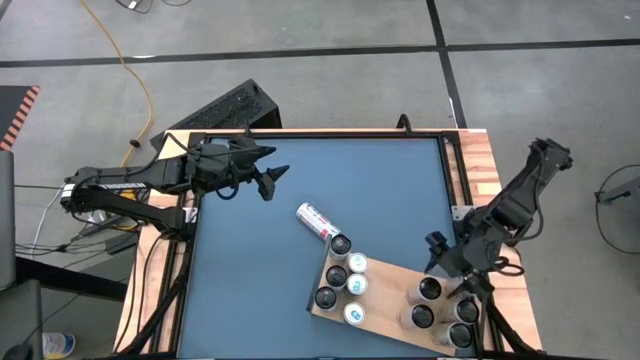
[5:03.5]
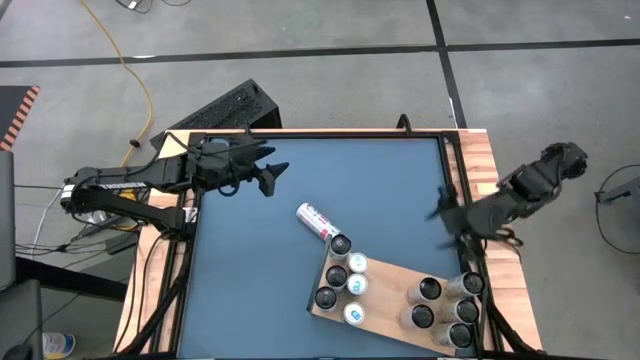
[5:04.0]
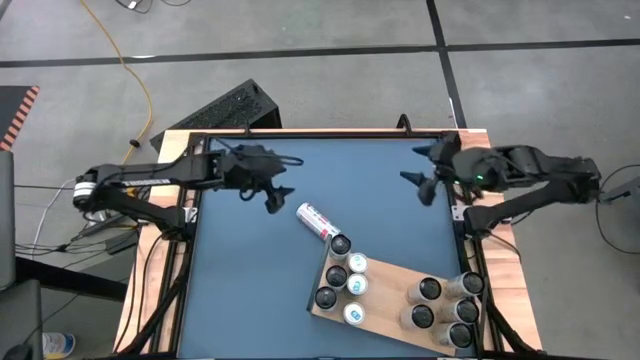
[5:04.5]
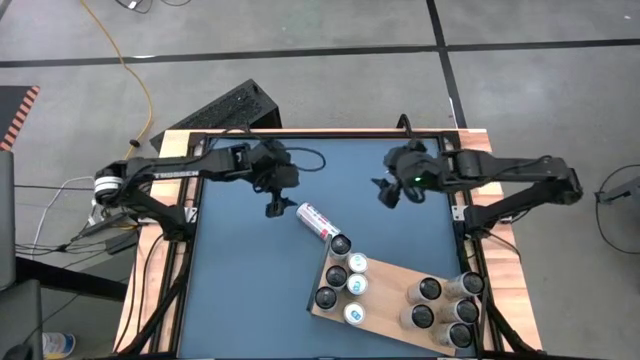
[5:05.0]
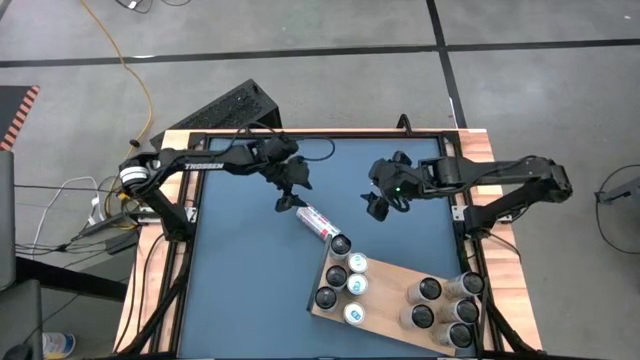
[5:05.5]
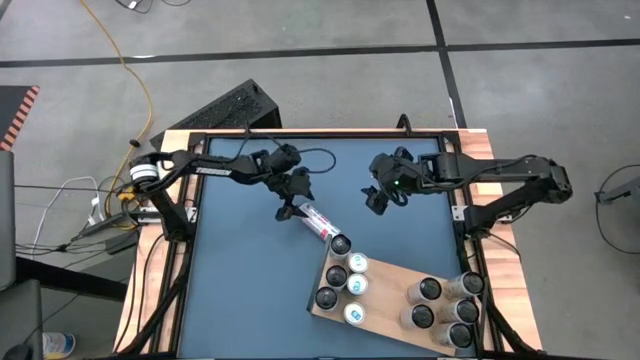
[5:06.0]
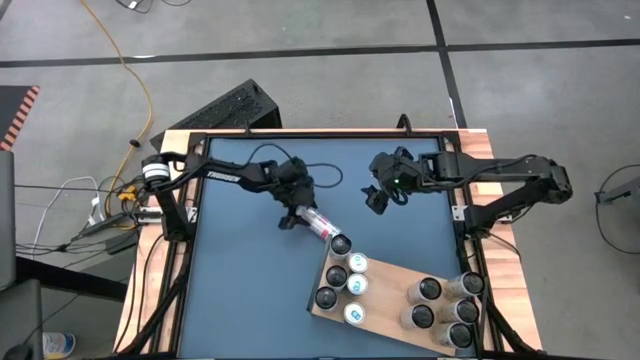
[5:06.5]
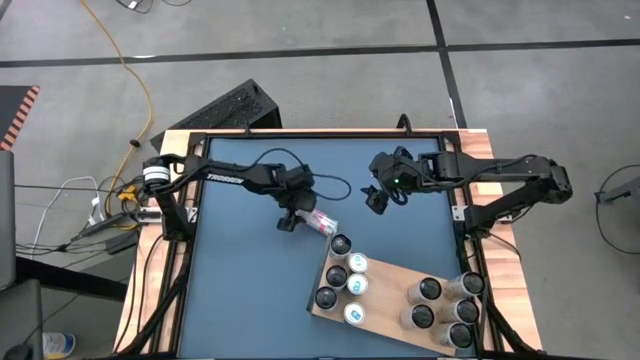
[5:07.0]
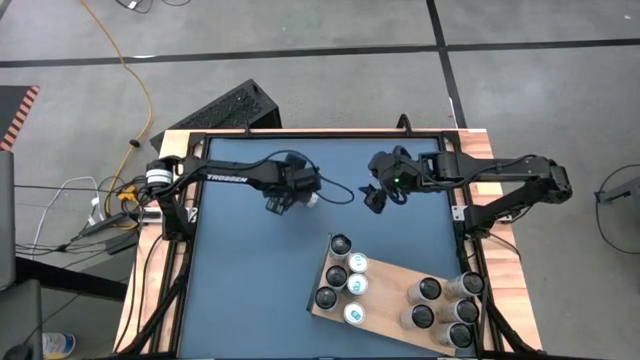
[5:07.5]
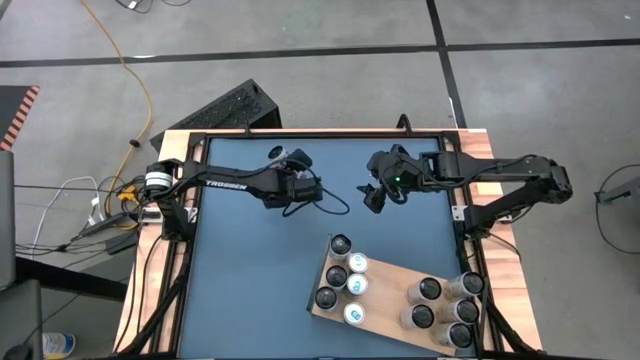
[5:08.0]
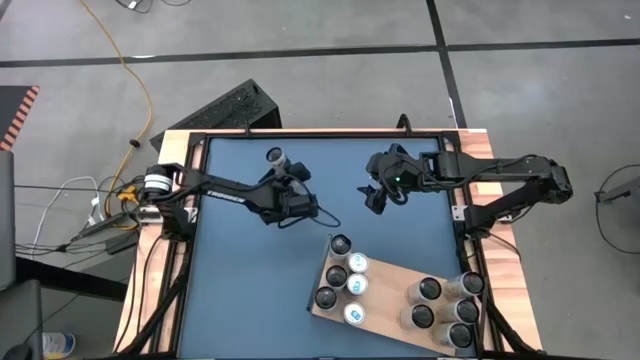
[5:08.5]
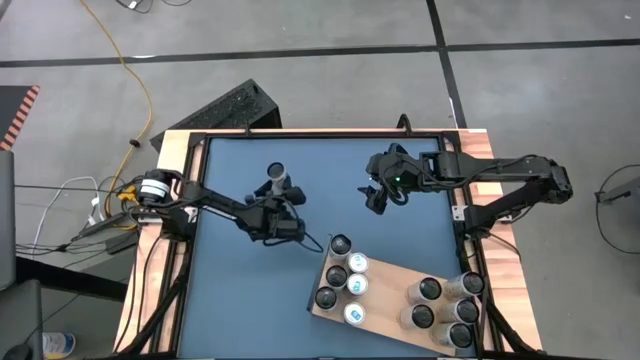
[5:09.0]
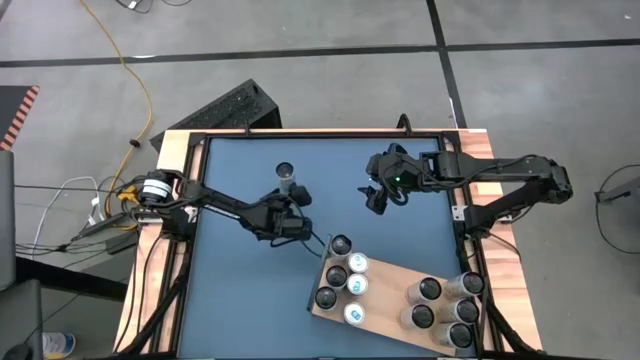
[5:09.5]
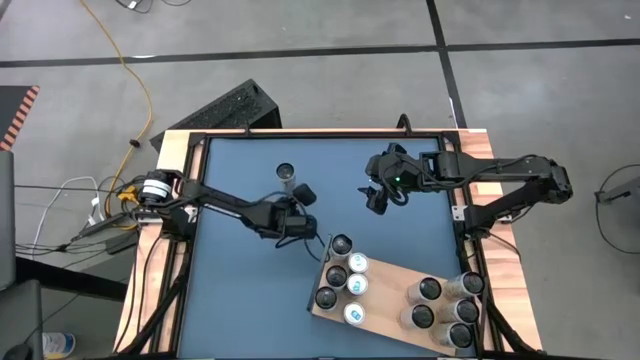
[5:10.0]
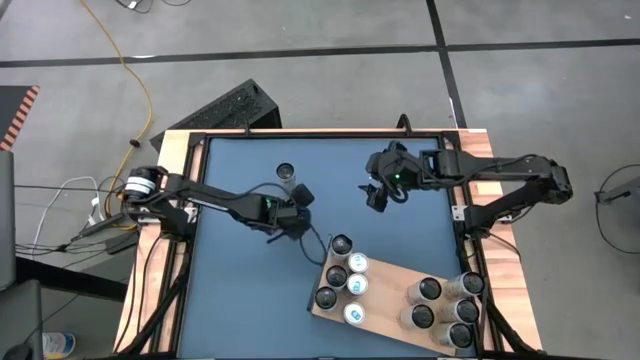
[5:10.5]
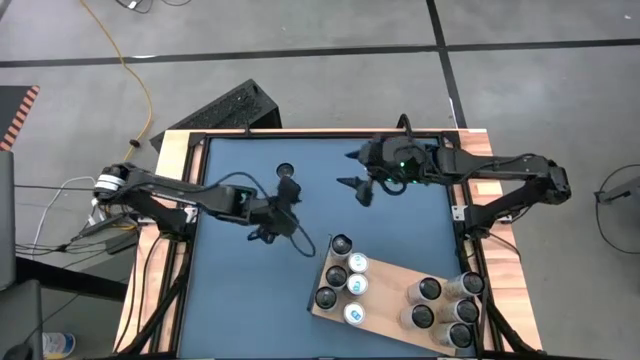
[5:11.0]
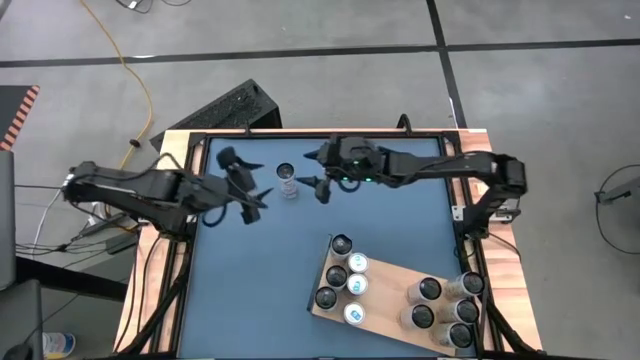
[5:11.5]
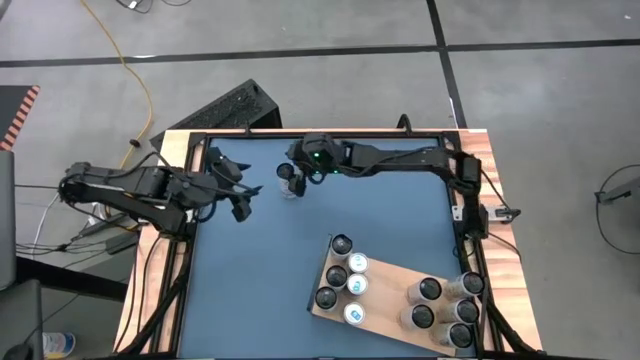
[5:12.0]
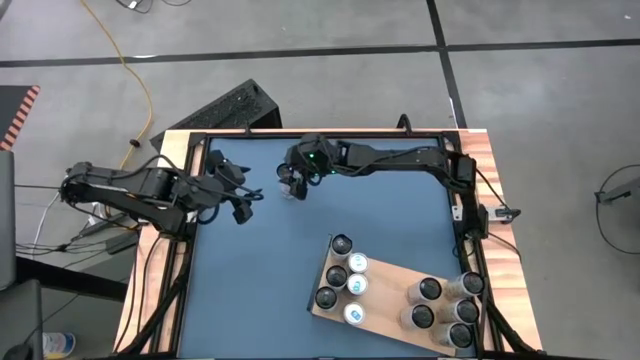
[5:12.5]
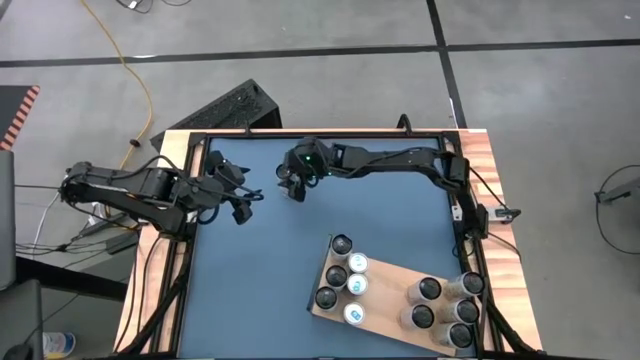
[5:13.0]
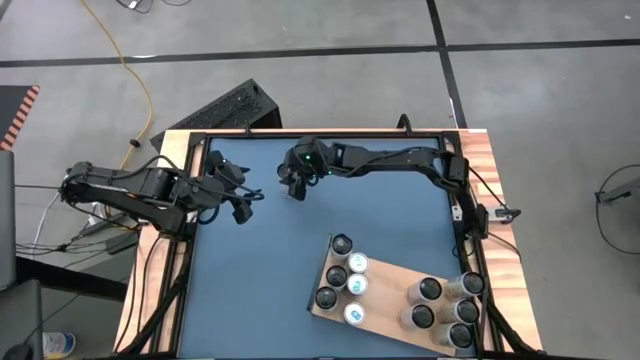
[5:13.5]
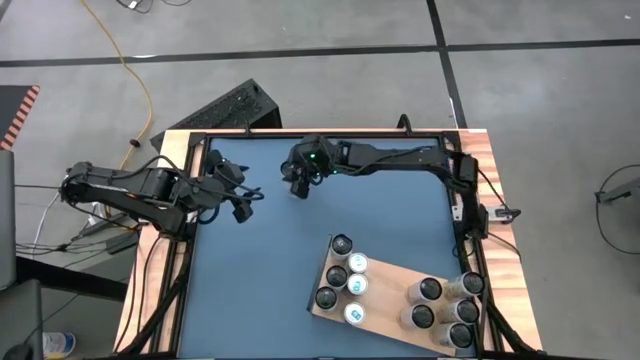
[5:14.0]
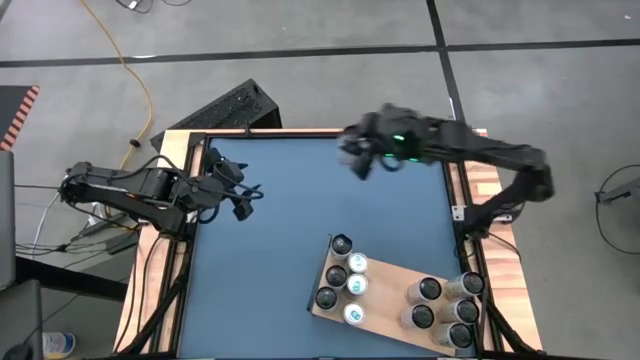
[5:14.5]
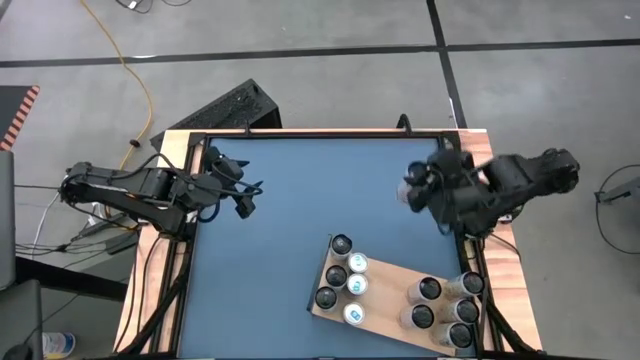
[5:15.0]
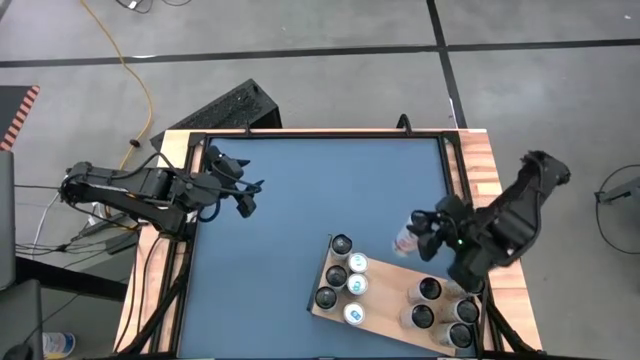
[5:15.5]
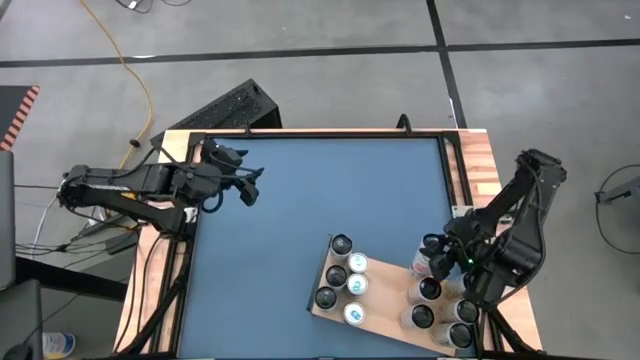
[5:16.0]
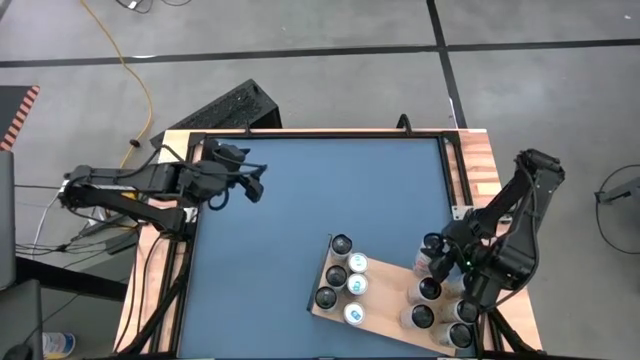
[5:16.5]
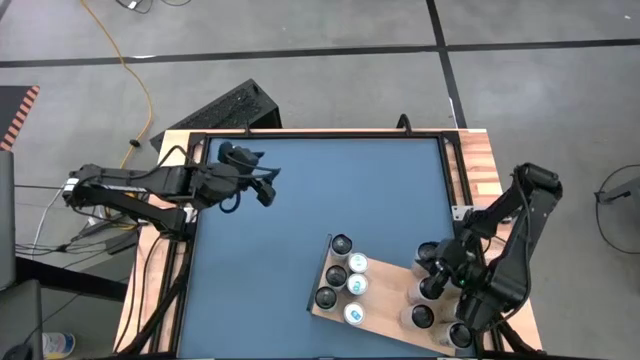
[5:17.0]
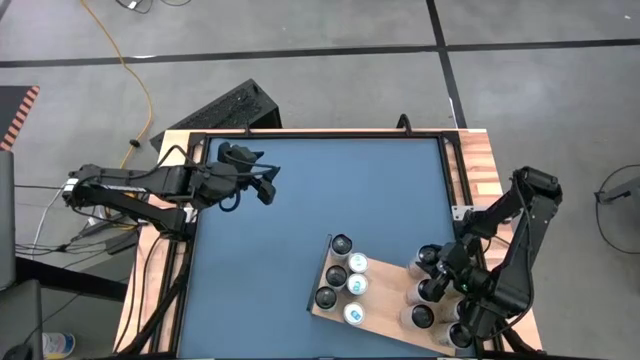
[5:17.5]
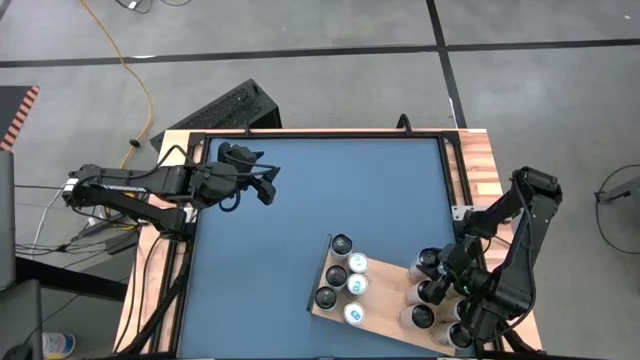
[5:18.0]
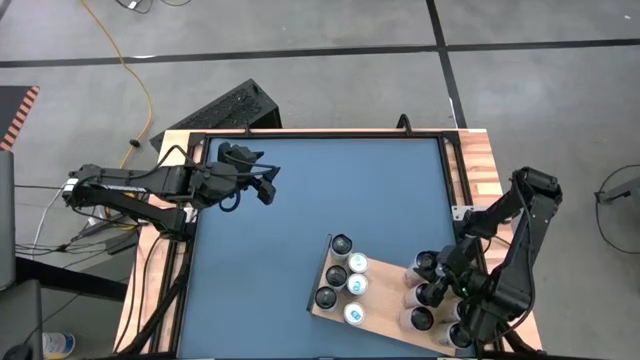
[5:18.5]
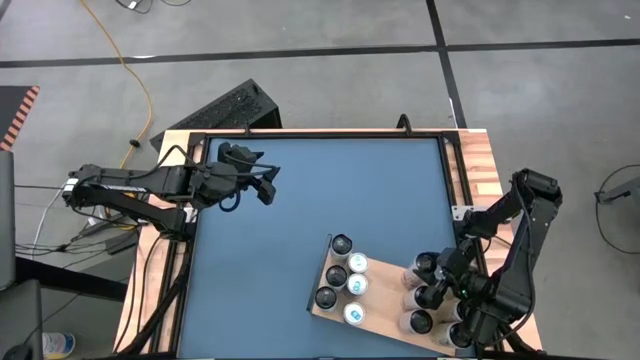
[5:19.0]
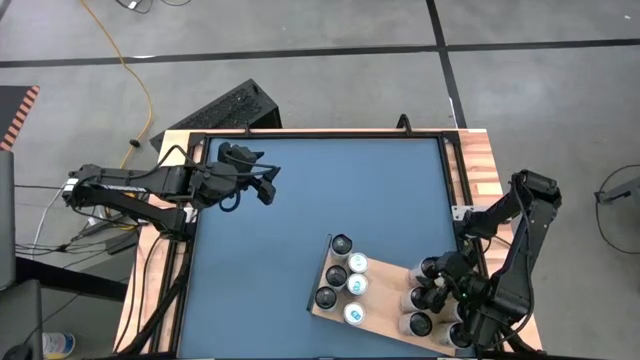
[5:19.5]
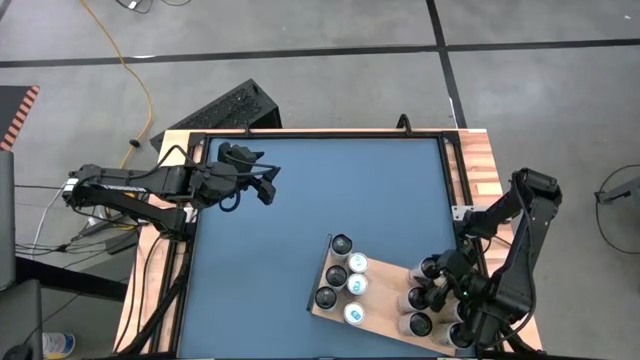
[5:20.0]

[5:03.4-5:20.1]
Task: Place canned beverage on shelf
Put the white pink soda can on the shelf

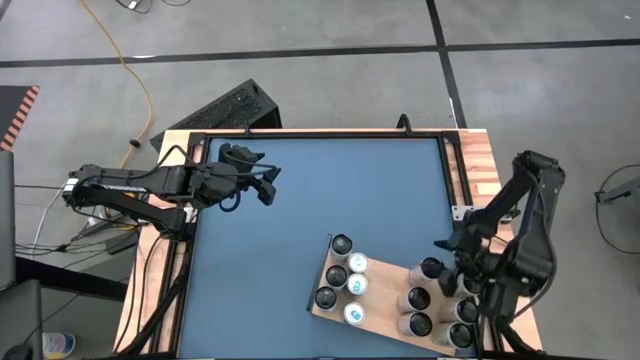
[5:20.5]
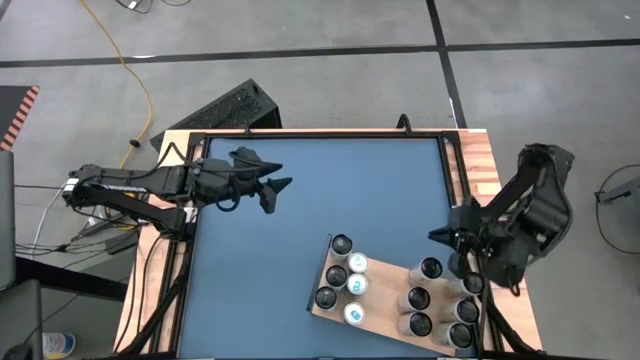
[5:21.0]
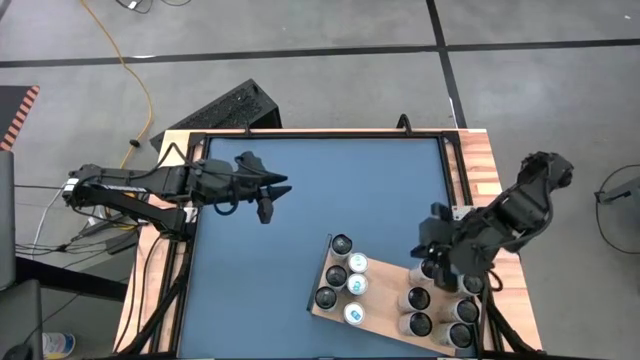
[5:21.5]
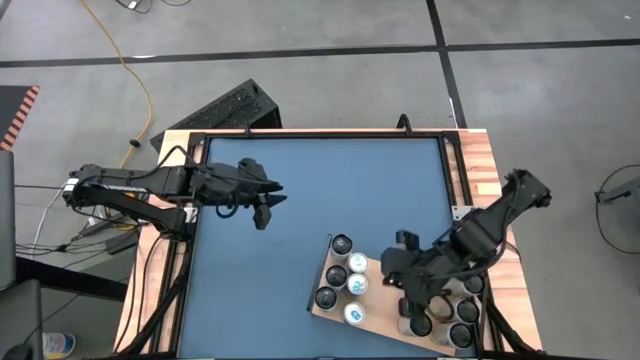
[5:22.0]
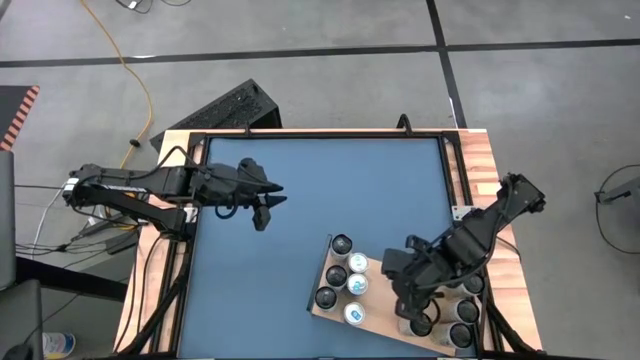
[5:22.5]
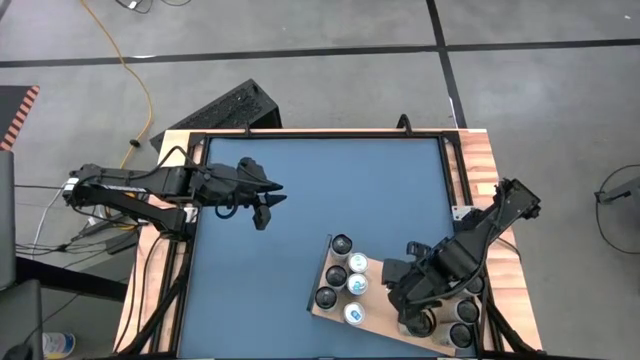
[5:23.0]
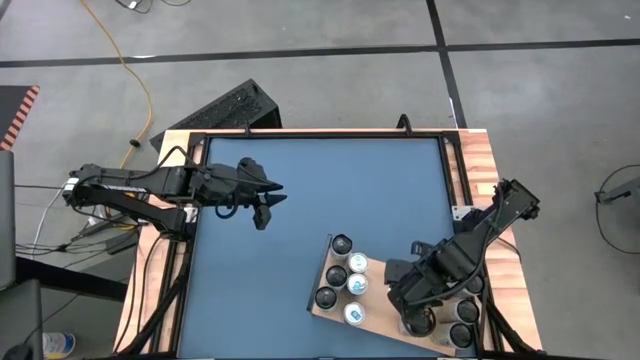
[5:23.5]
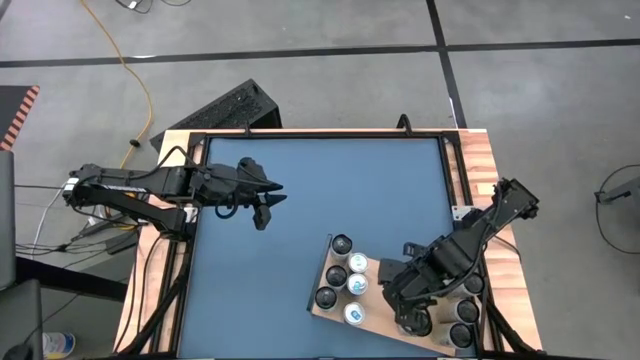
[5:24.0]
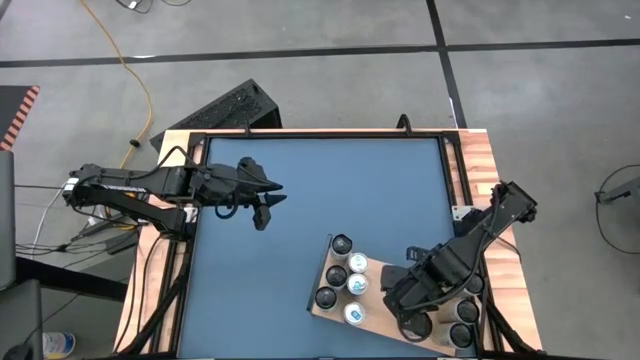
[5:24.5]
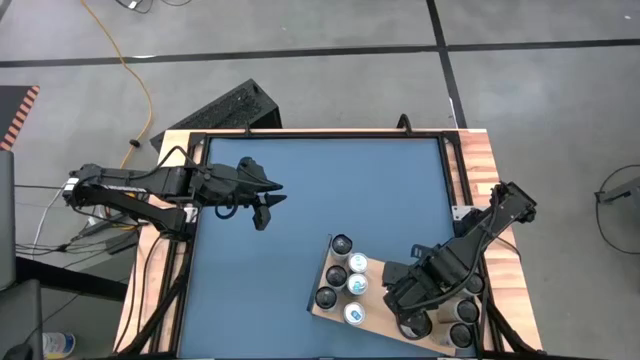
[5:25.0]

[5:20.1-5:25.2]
Adjust the white pink soda can on the shelf
